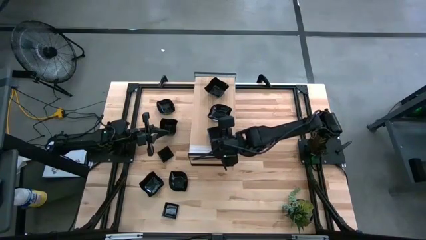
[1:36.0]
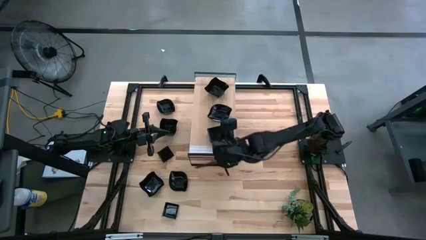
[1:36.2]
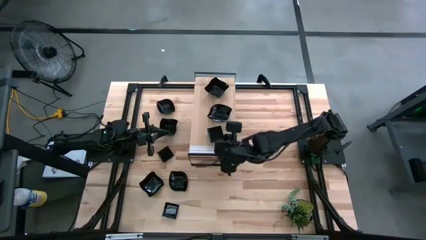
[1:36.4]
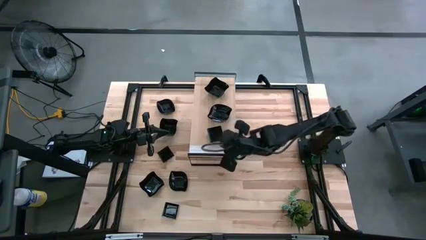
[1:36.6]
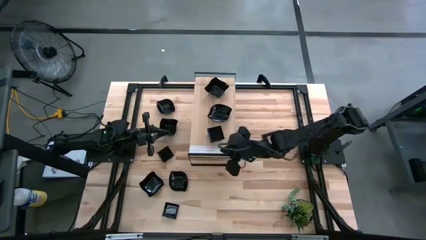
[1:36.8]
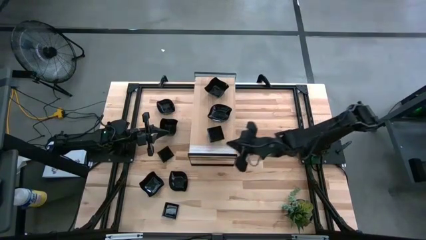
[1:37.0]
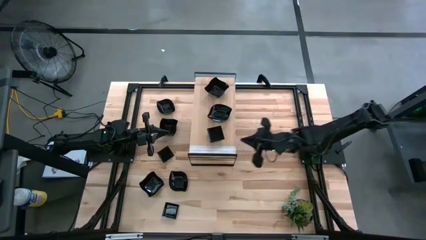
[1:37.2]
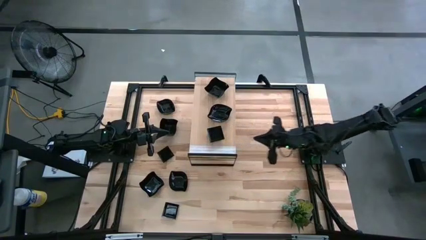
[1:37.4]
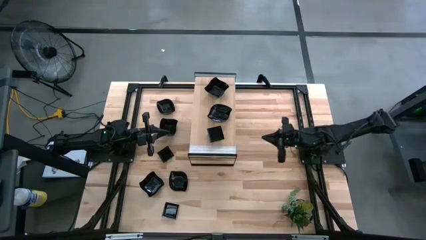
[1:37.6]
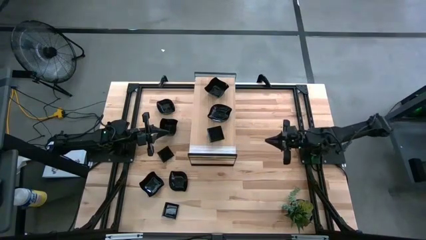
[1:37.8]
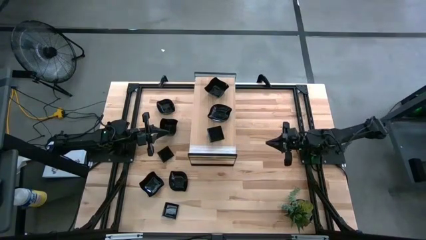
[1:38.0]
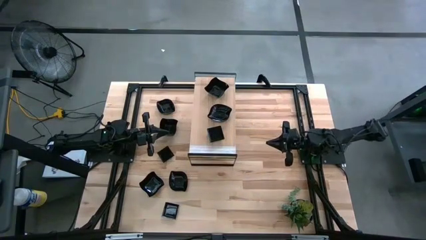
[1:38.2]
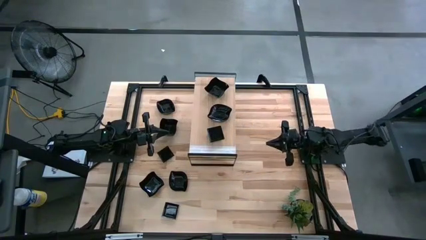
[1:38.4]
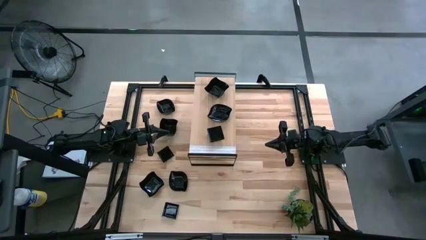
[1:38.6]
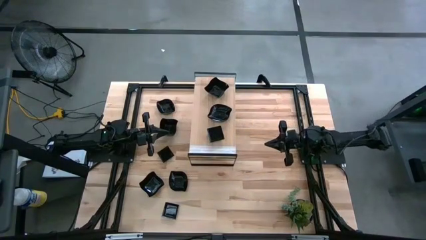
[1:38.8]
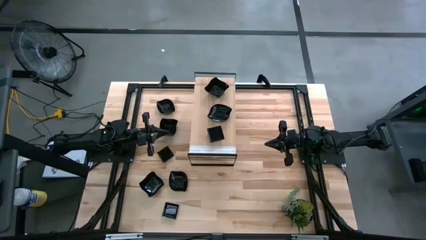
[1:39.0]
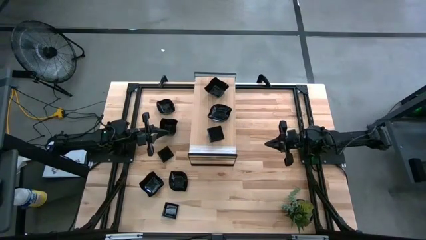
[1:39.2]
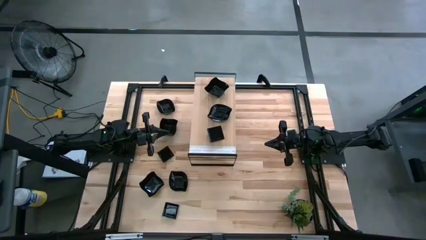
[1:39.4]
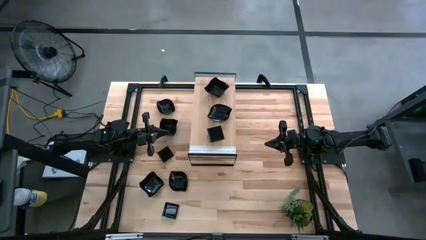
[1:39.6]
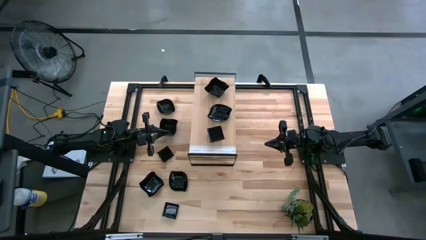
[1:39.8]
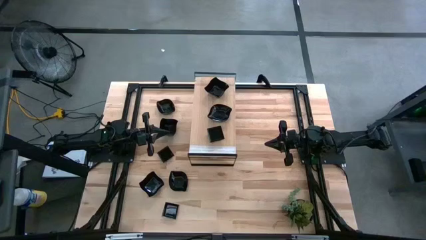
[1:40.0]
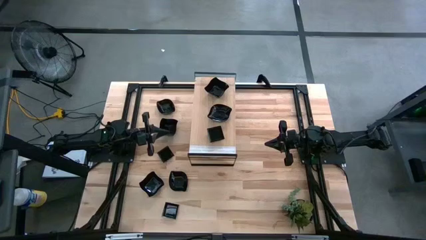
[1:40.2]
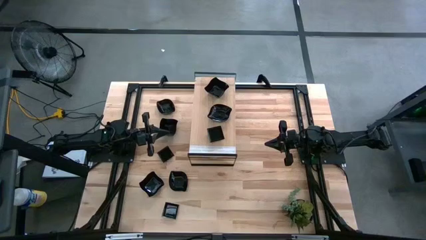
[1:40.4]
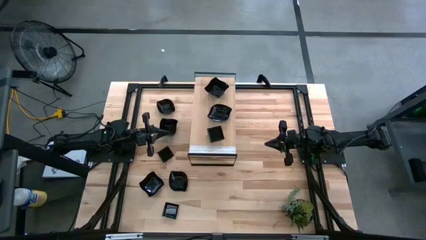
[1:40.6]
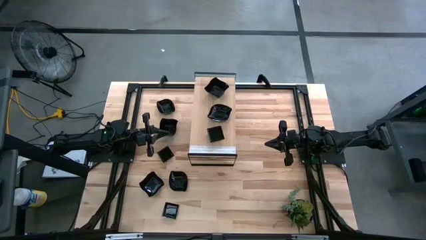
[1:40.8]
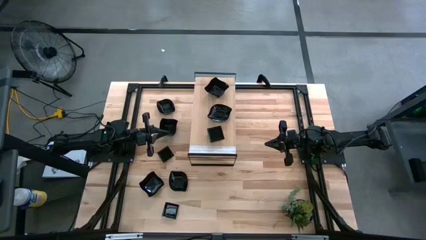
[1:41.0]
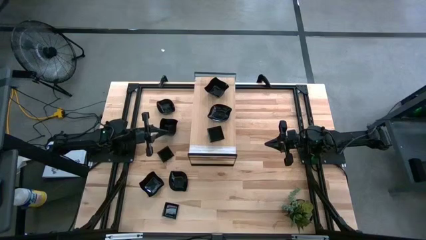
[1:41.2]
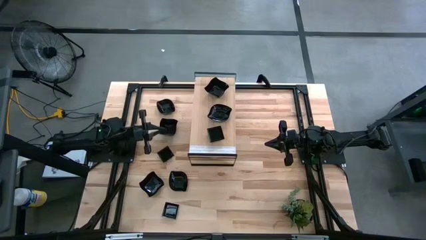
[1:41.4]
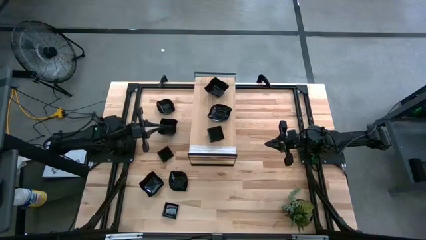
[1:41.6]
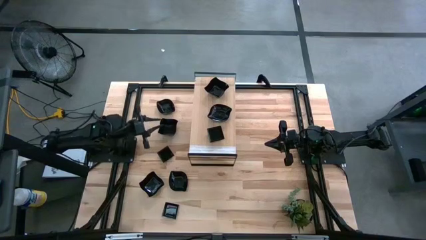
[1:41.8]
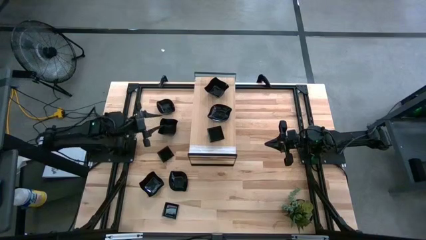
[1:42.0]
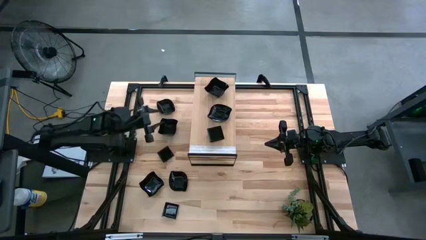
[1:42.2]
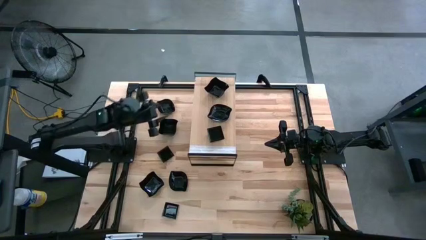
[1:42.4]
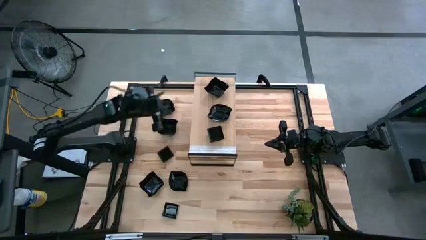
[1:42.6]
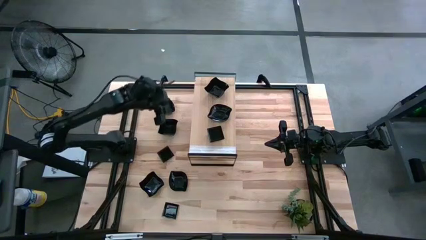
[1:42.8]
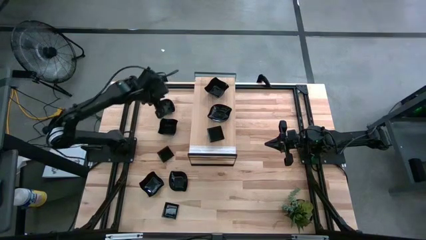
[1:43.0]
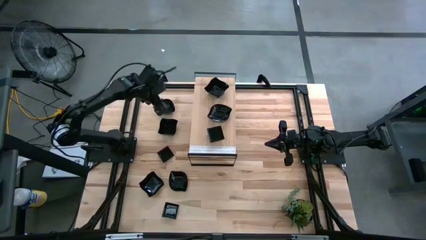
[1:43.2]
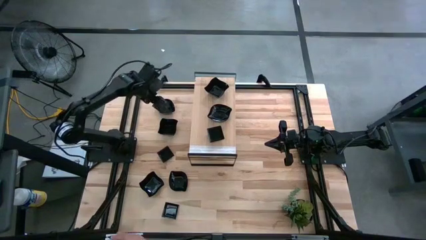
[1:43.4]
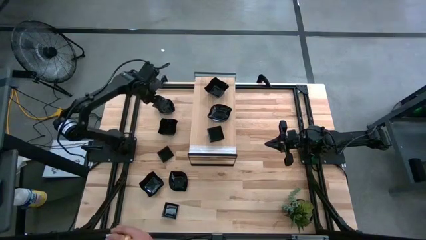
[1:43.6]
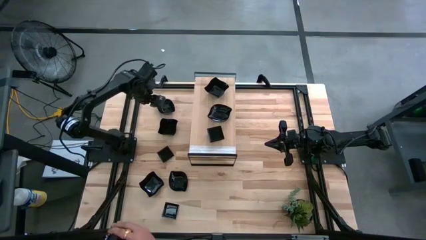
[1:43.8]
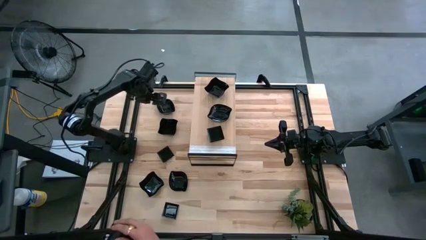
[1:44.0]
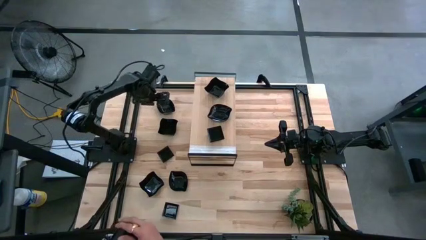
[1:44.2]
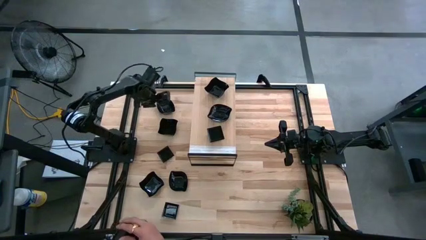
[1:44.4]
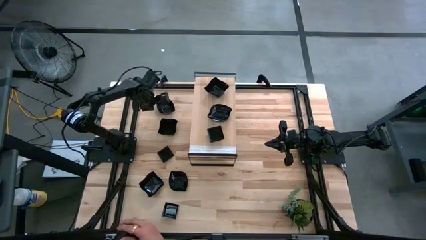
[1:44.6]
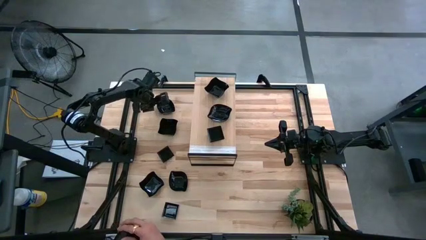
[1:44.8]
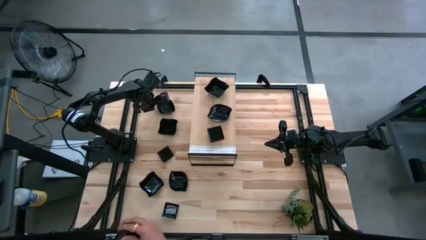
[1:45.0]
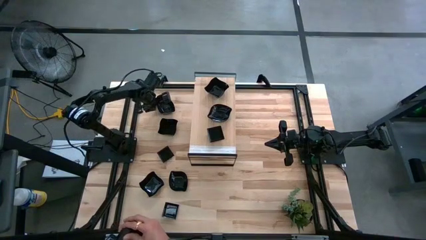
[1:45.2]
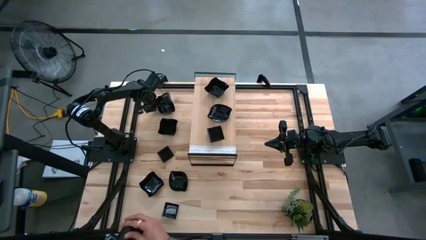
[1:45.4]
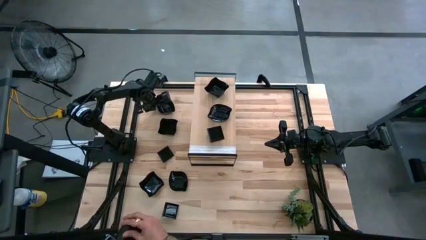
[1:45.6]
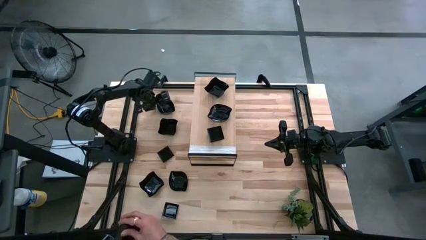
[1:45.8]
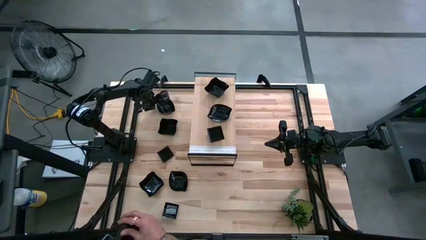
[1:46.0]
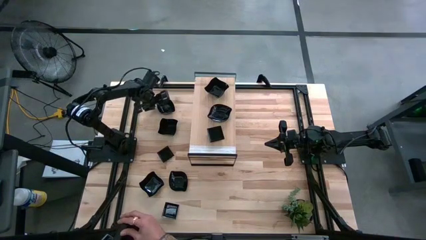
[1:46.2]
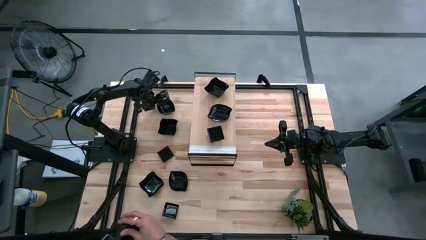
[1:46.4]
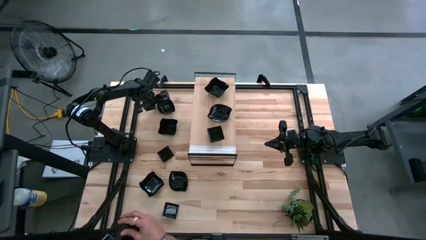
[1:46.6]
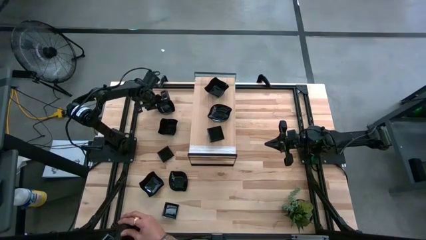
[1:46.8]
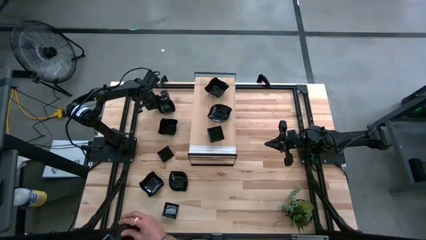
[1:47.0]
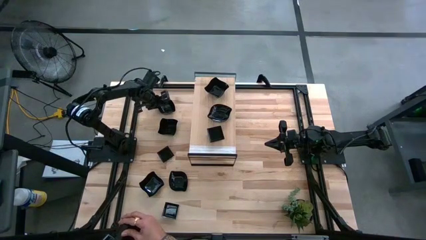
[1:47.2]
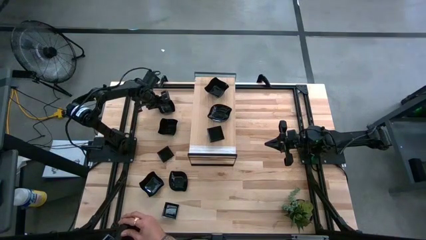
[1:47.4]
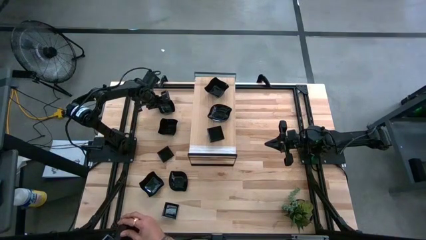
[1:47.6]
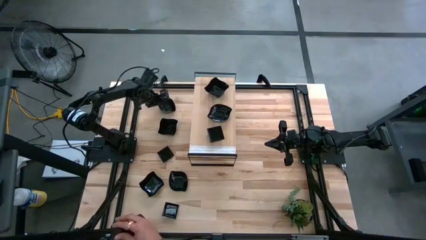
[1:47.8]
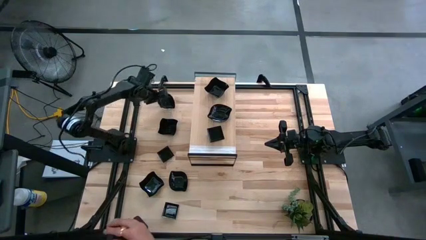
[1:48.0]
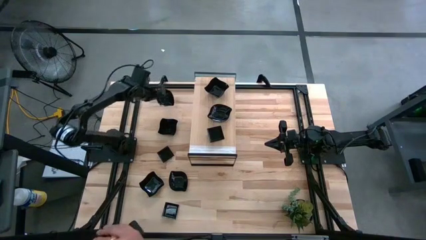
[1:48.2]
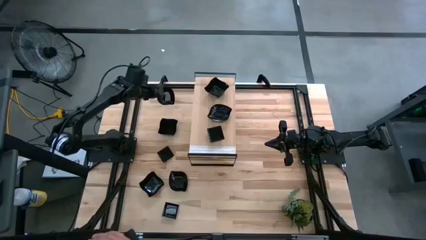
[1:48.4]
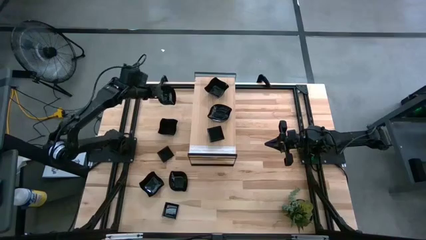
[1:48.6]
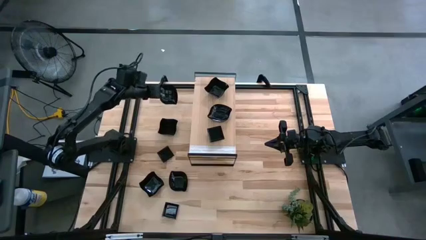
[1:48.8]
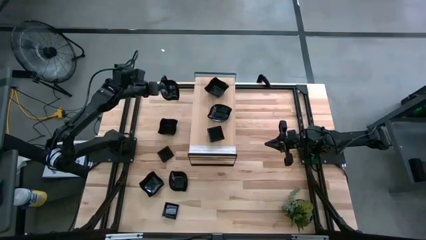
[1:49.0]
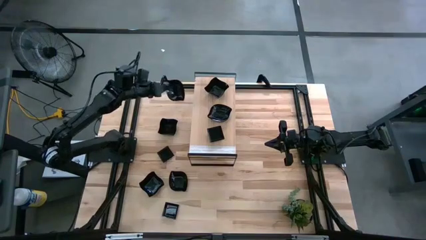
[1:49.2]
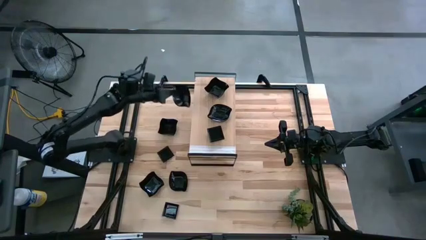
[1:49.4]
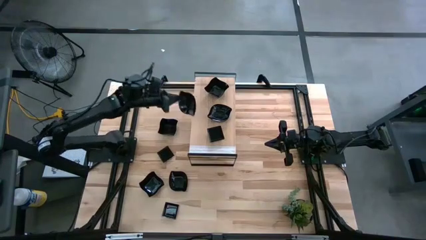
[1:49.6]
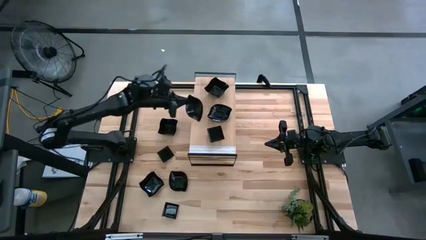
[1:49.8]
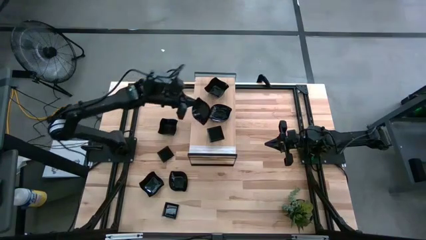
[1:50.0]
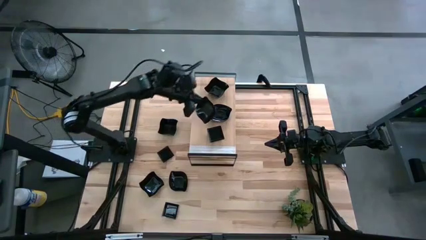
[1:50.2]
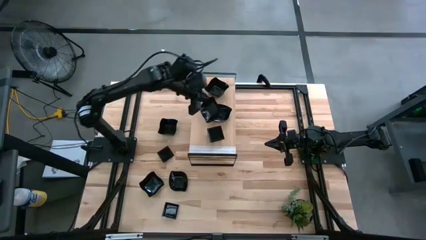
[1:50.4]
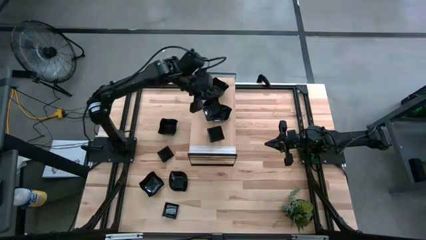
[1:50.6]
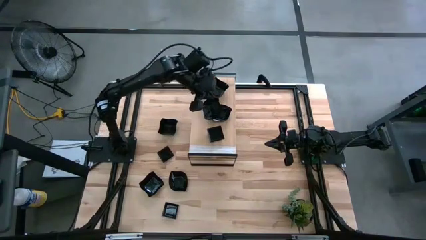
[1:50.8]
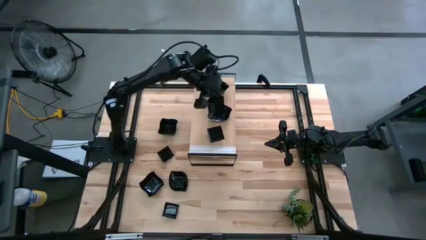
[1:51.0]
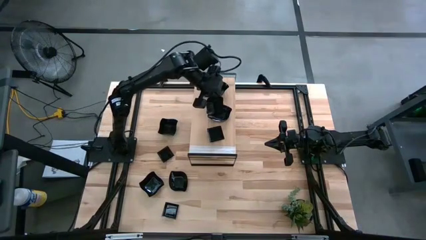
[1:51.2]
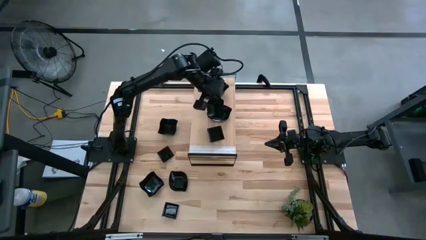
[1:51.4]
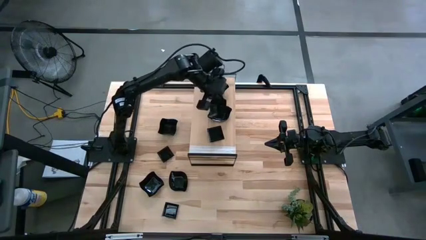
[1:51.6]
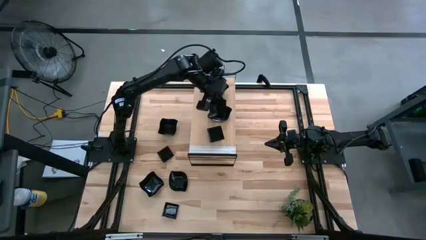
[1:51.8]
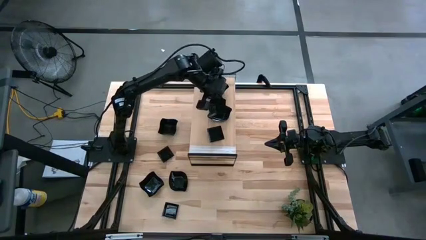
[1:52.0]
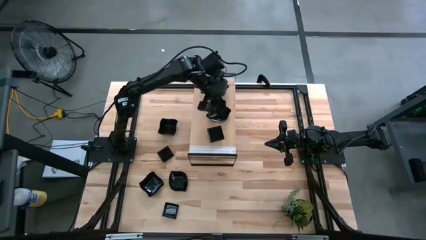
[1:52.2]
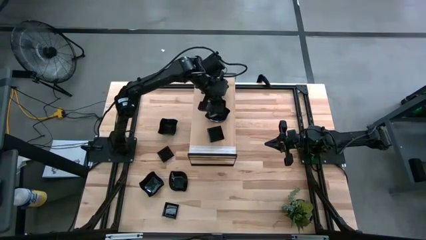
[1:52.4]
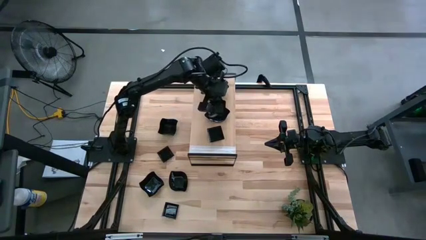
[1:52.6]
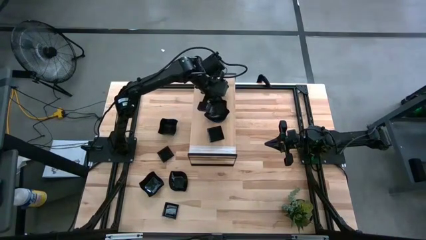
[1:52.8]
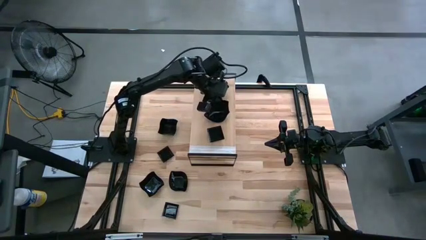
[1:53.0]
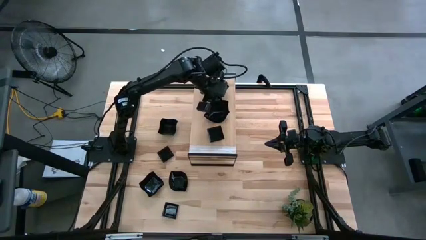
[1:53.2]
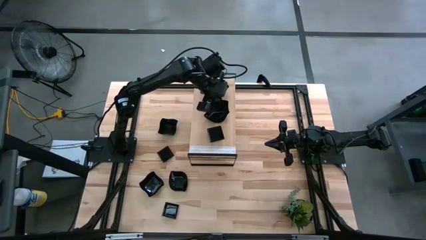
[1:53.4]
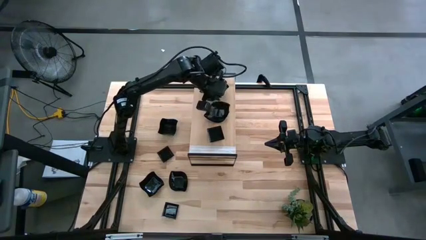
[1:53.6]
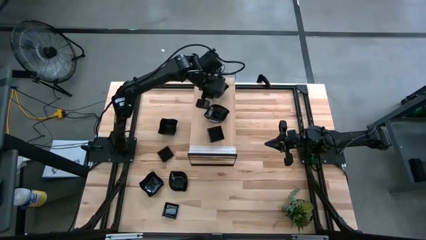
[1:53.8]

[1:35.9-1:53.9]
Task: Pick & Place Mini shaped plates
Stack the leaf-shaped plate on top of the stacked leaf-shaped plates on the shelf
